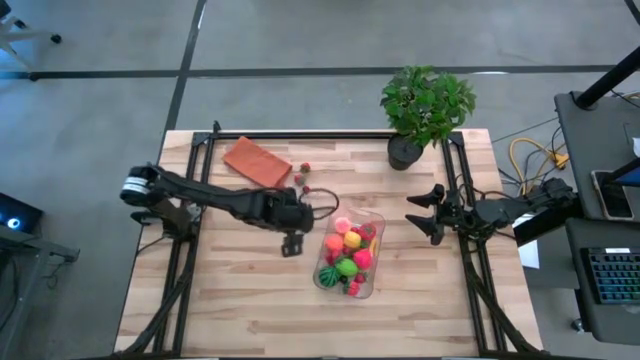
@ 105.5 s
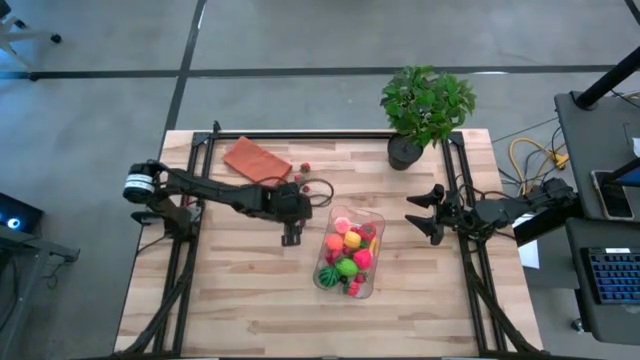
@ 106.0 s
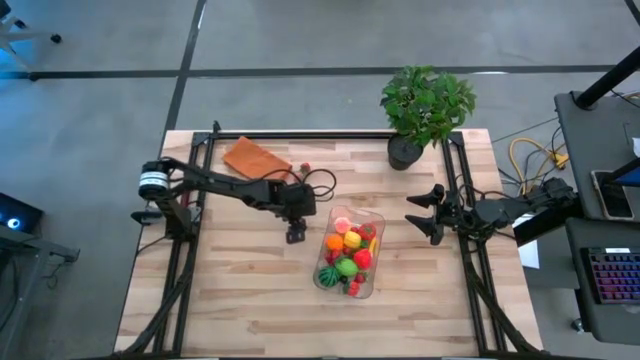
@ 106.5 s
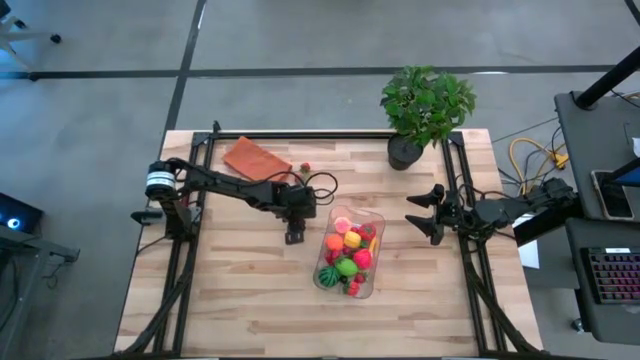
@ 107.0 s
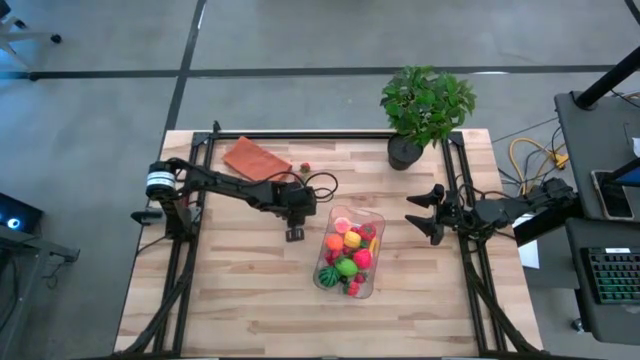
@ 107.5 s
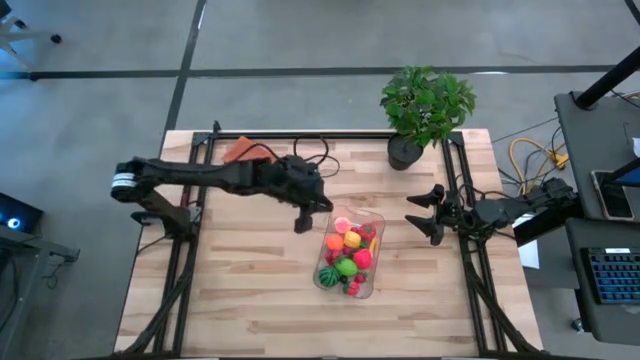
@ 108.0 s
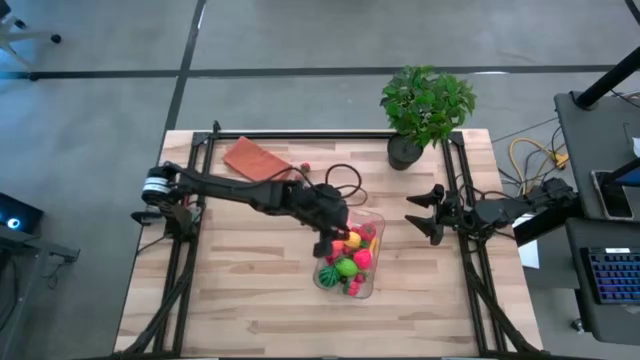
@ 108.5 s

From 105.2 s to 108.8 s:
Task: Pick and placing Produce into tupperware
Put the cherry into the transparent bin

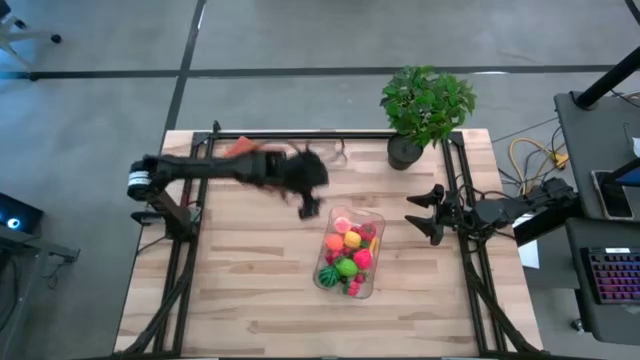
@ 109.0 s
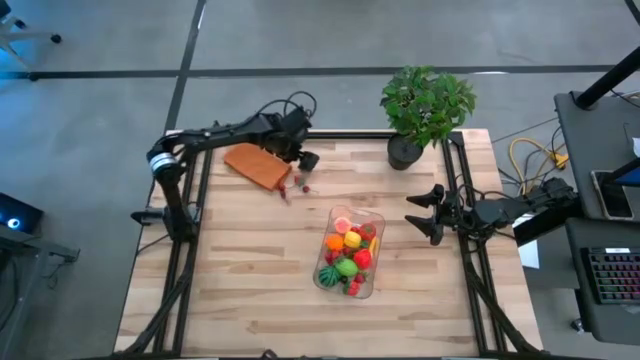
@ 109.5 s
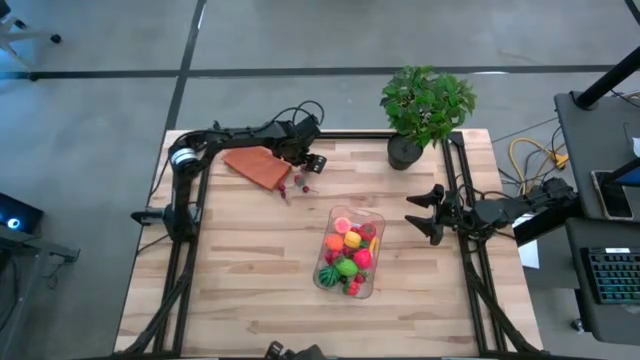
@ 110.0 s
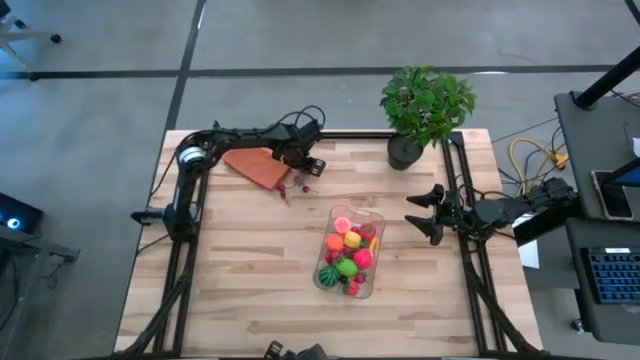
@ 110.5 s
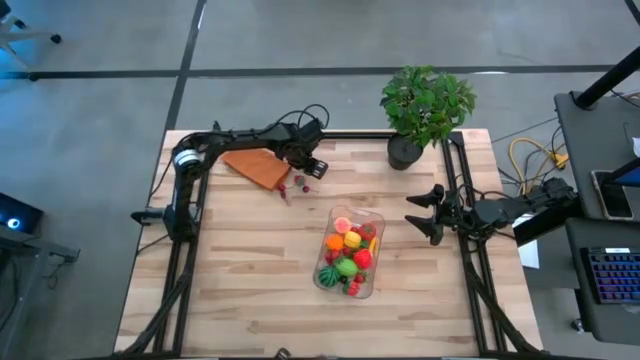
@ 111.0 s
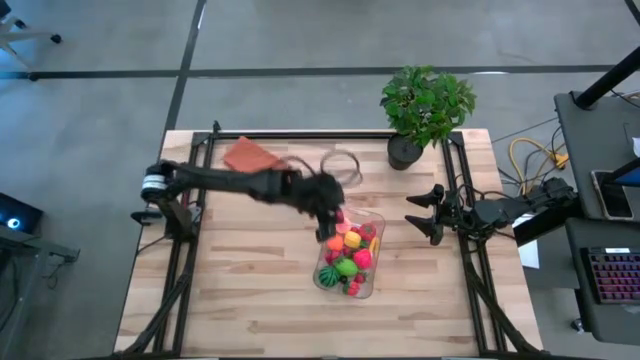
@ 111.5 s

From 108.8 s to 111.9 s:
Put the strawberry into the transparent bin

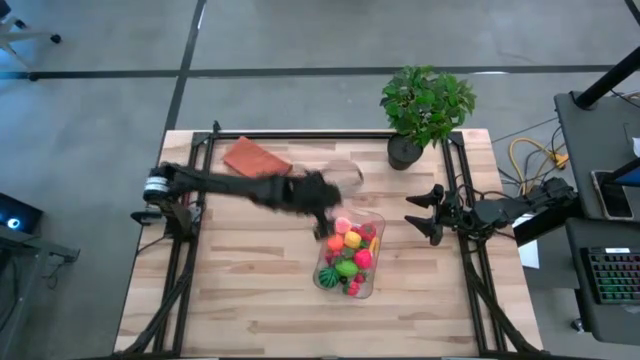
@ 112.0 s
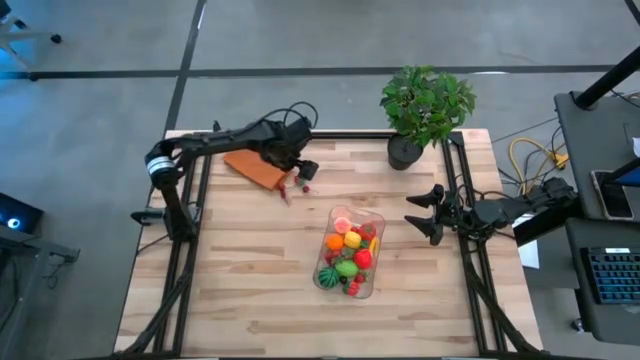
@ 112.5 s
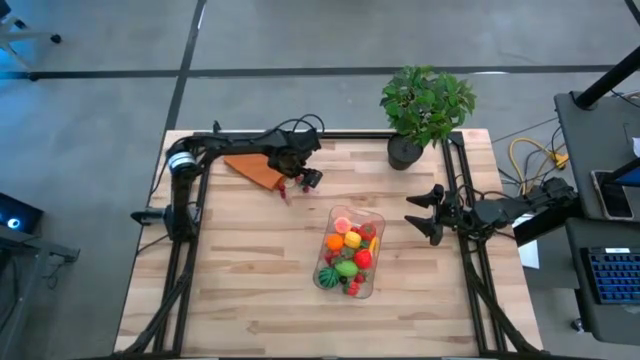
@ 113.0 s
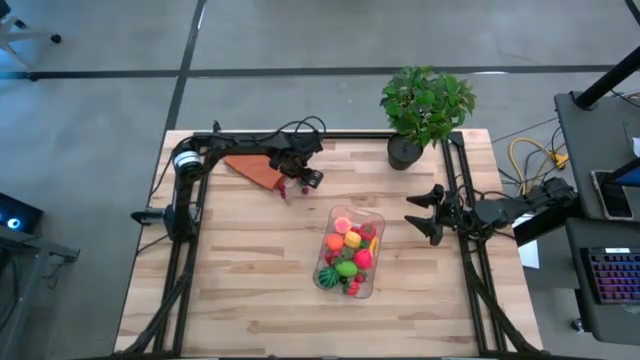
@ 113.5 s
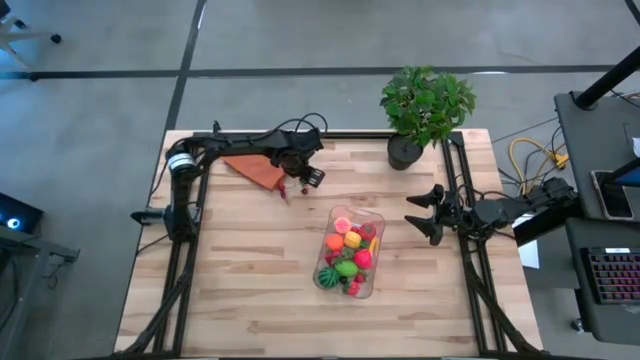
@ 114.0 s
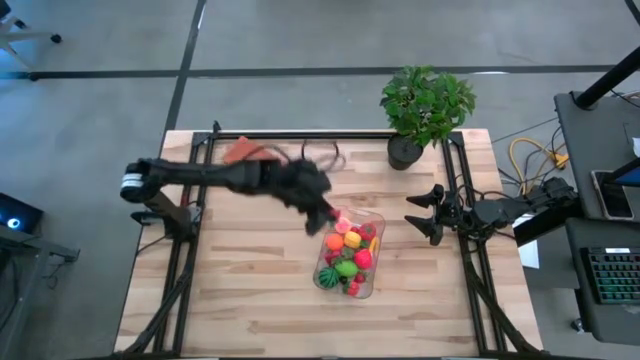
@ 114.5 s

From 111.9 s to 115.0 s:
Put the strawberry into the transparent bin

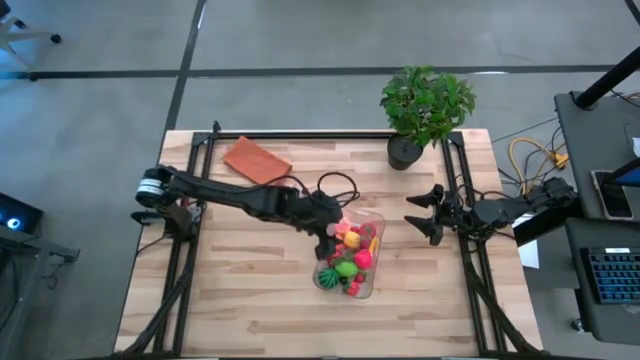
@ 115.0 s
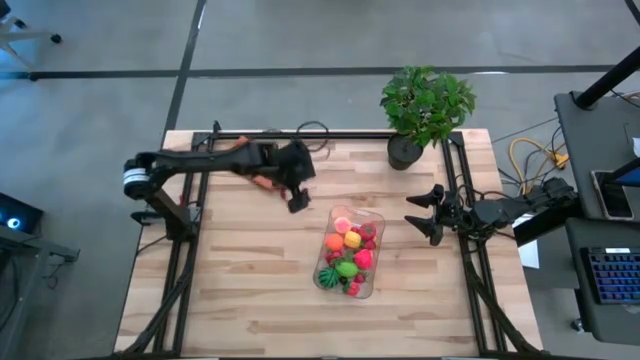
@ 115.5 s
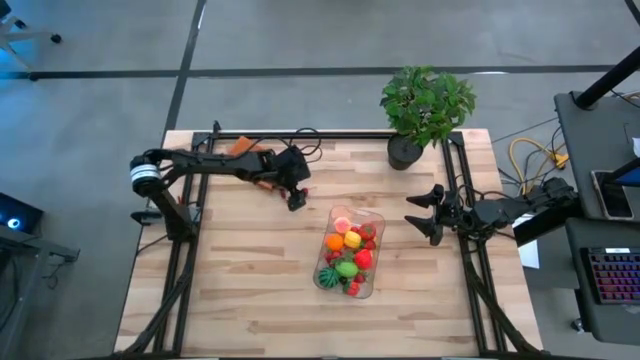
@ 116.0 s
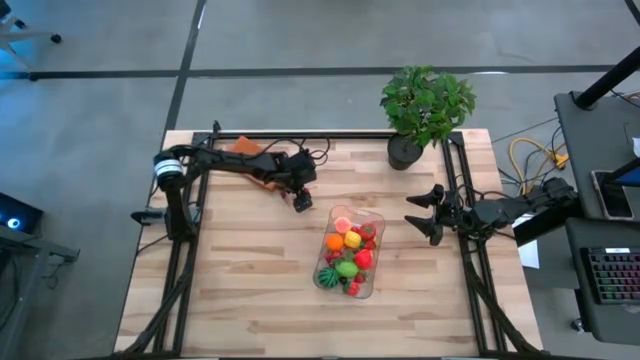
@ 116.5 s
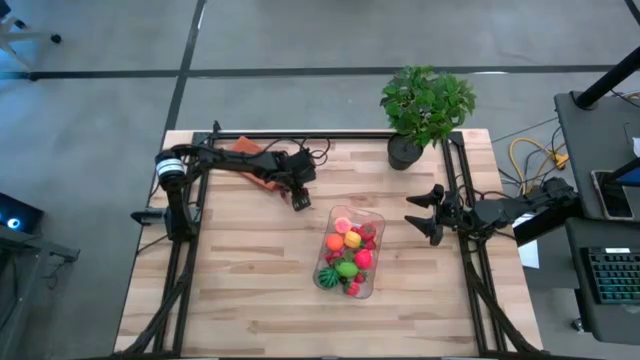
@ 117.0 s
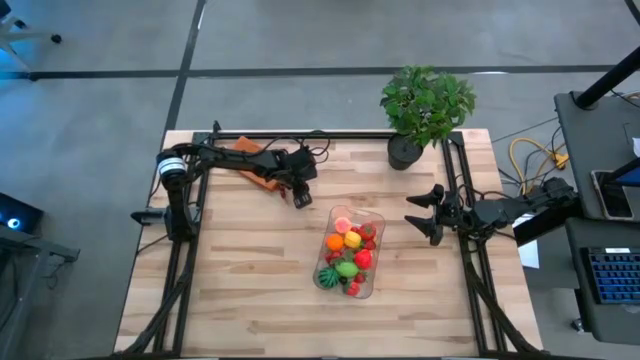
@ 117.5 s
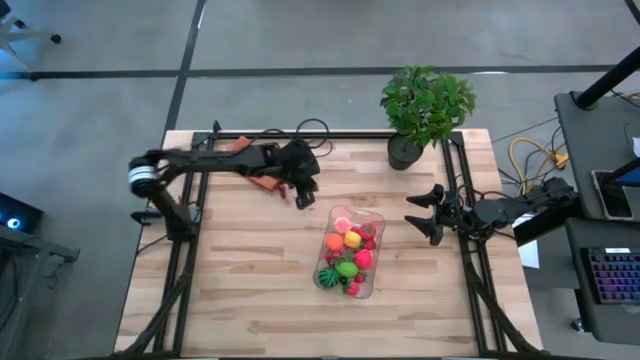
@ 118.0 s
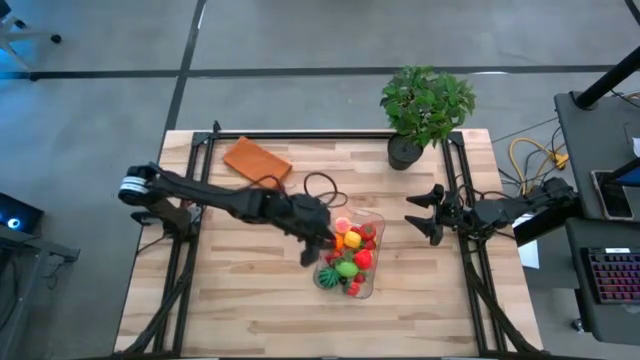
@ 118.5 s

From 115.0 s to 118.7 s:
Put the cherry into the transparent bin

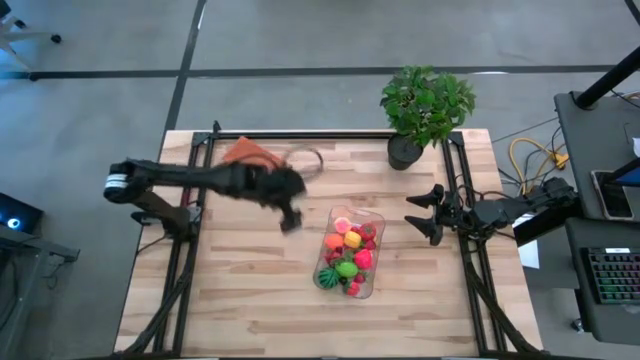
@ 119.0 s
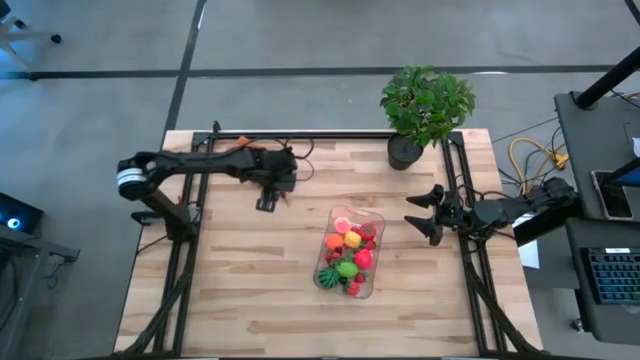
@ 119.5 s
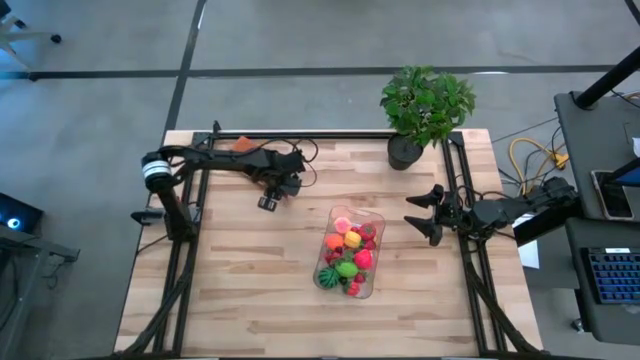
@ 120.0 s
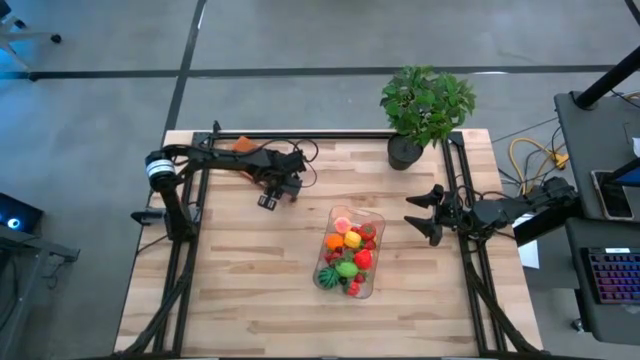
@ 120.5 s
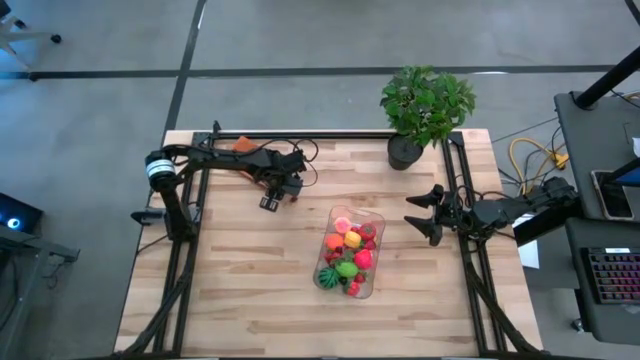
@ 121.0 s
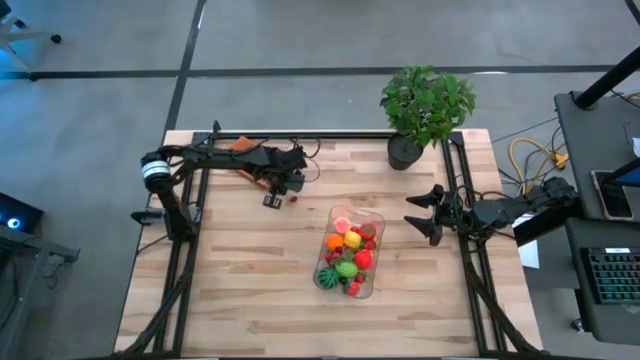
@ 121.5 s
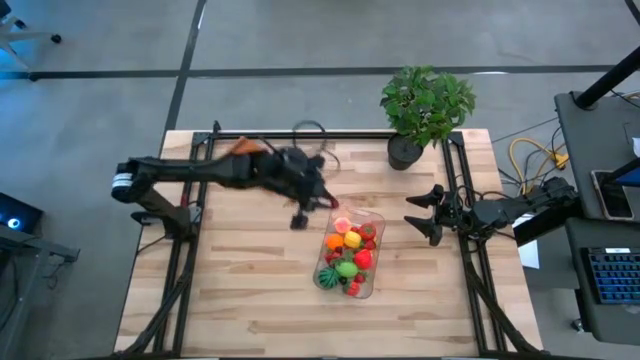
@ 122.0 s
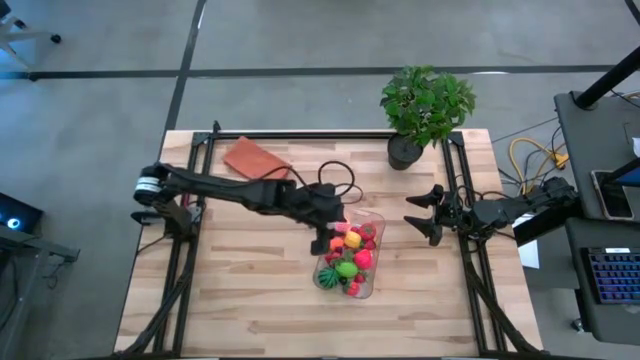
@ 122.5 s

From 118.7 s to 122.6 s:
Put the cherry into the transparent bin

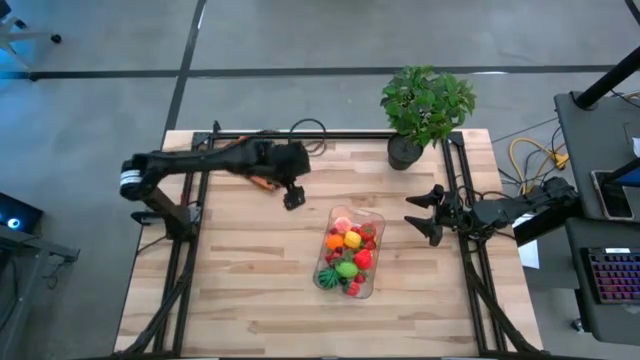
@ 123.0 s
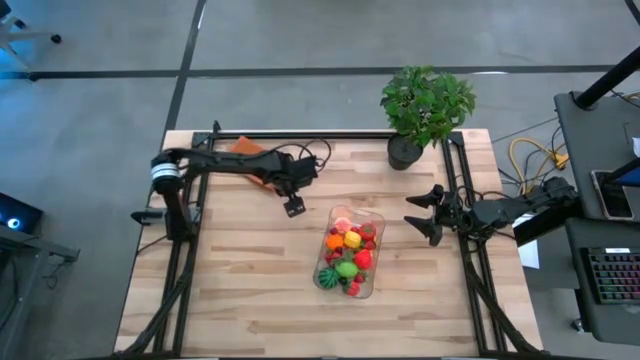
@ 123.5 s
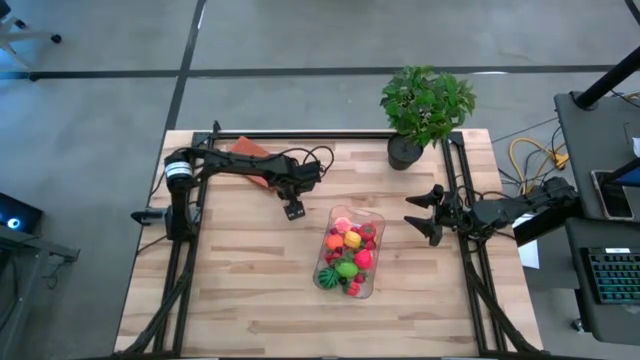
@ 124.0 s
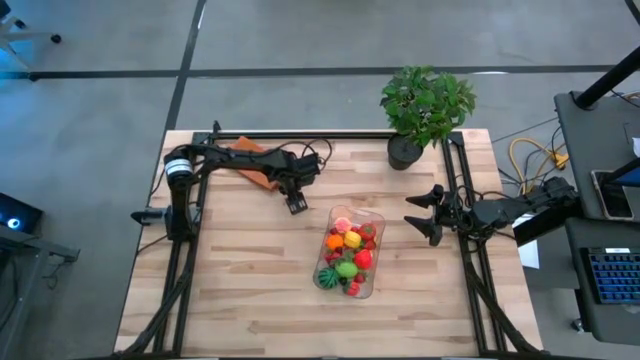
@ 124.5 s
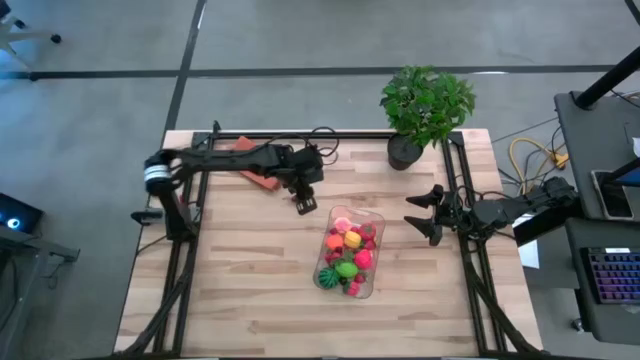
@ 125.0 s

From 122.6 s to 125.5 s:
Put the cherry into the transparent bin

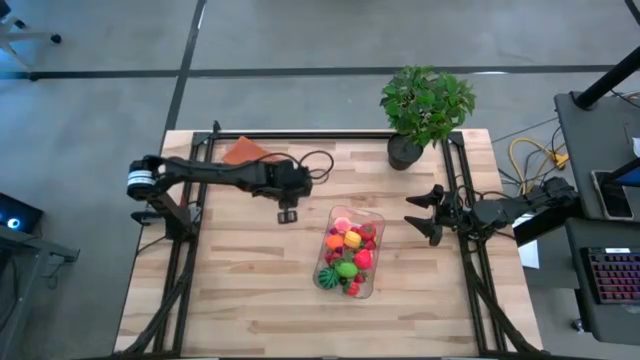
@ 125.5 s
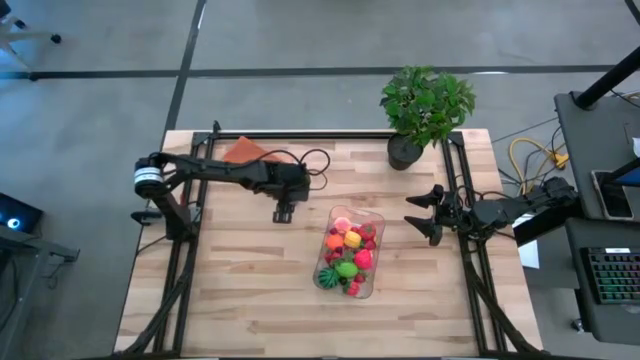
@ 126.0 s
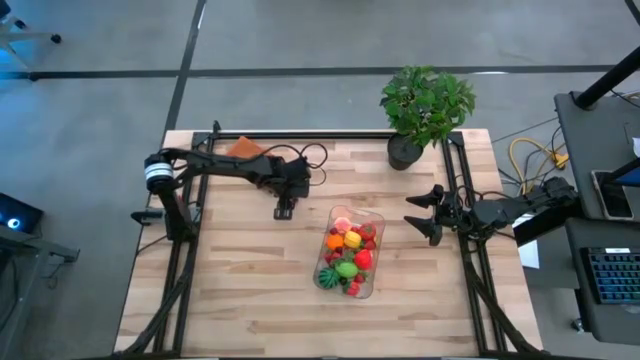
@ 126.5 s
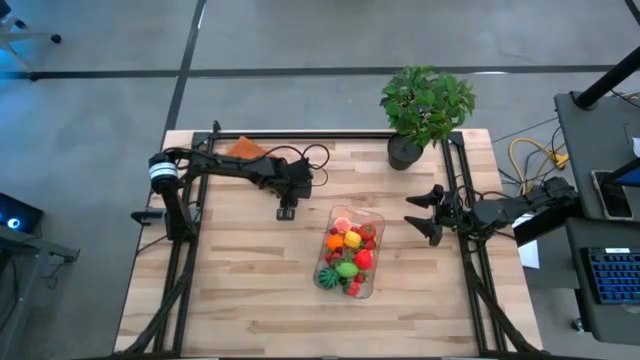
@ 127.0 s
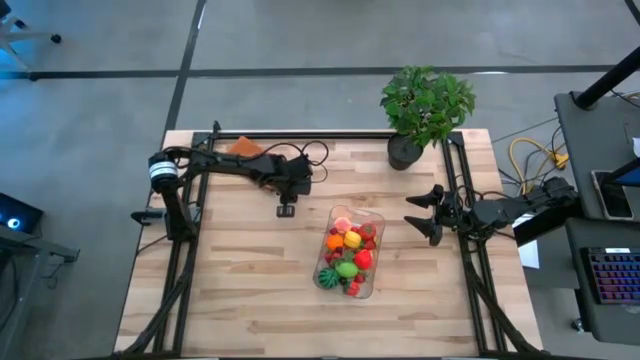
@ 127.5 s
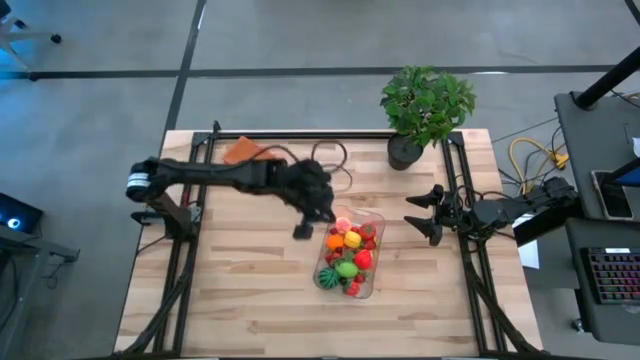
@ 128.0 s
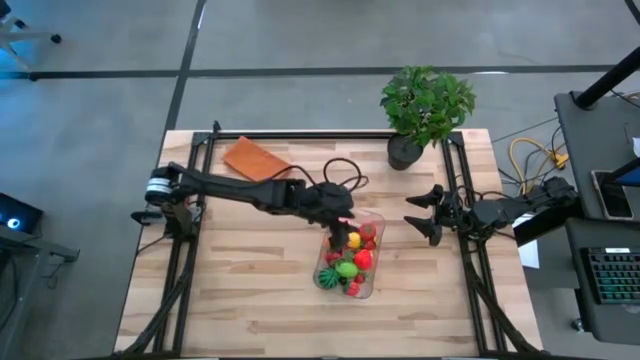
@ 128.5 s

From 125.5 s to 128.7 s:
Put the cherry into the transparent bin
